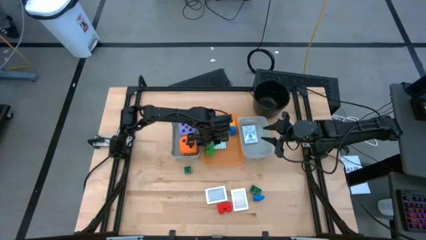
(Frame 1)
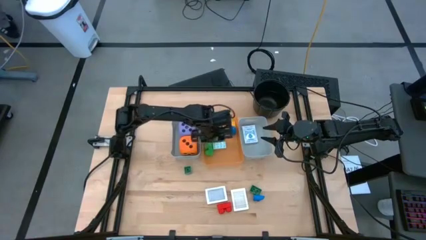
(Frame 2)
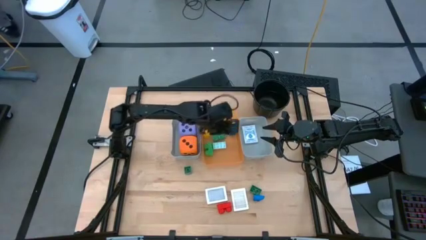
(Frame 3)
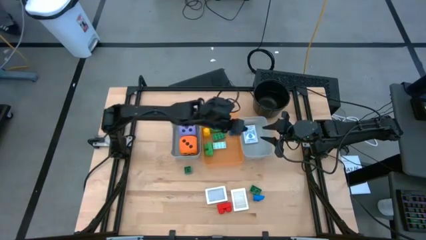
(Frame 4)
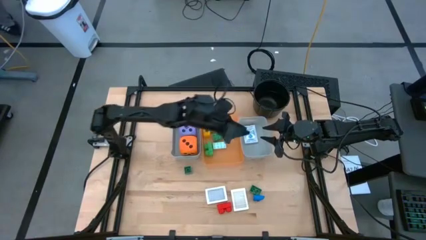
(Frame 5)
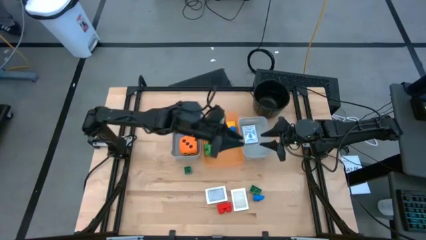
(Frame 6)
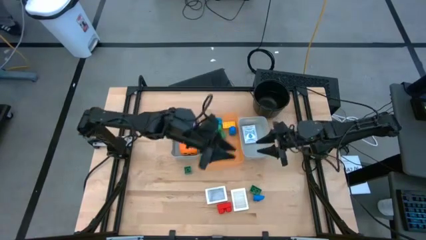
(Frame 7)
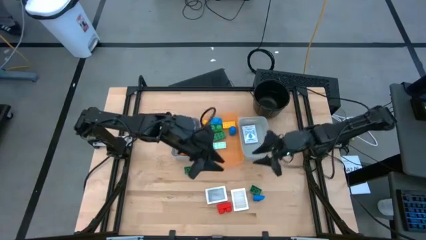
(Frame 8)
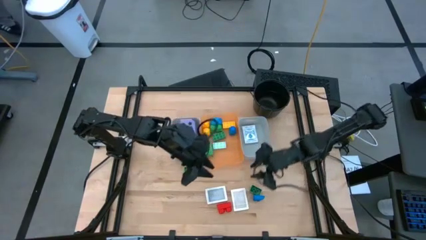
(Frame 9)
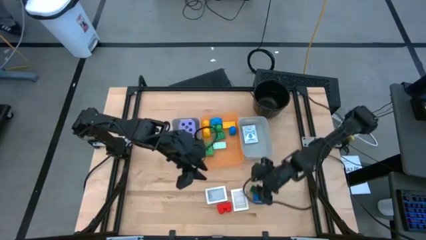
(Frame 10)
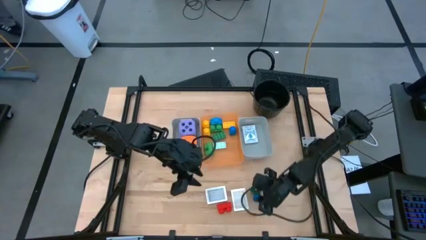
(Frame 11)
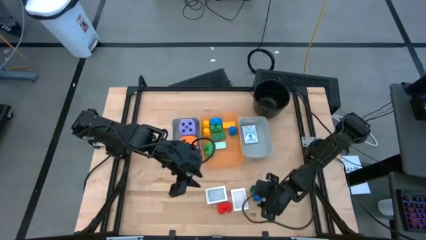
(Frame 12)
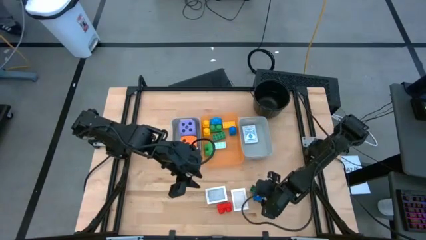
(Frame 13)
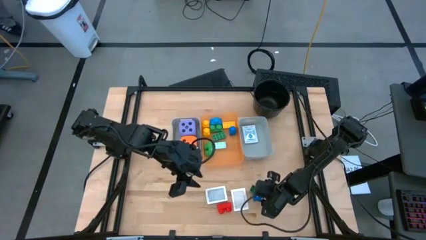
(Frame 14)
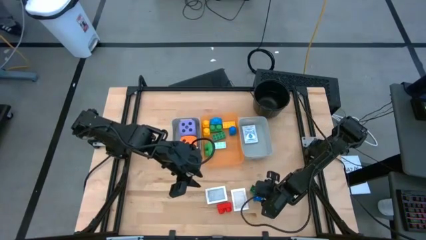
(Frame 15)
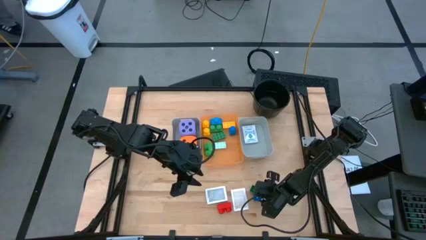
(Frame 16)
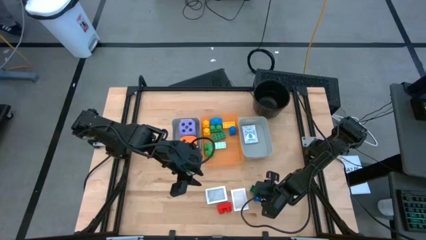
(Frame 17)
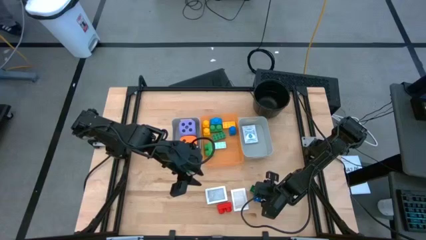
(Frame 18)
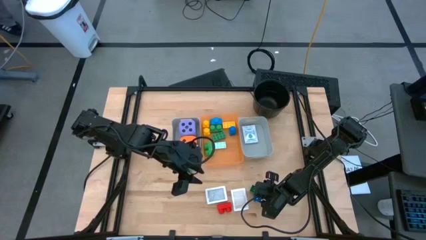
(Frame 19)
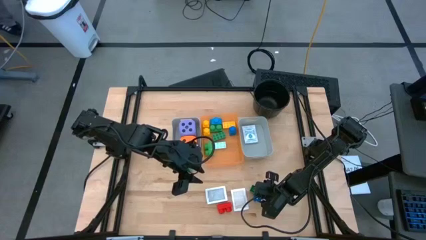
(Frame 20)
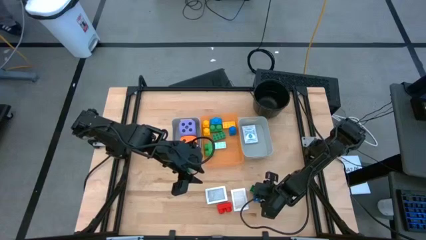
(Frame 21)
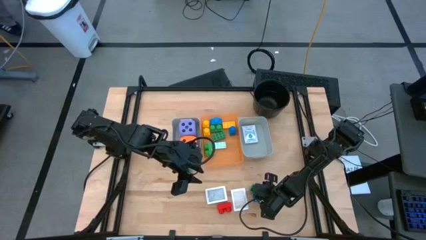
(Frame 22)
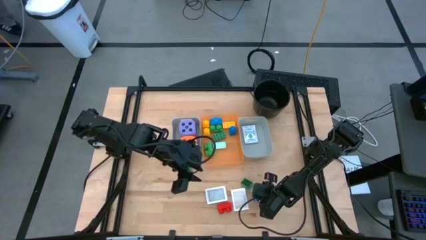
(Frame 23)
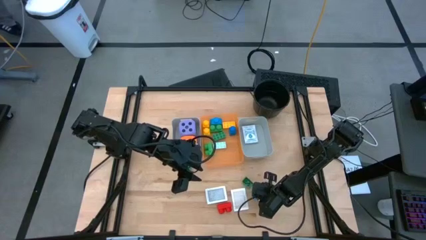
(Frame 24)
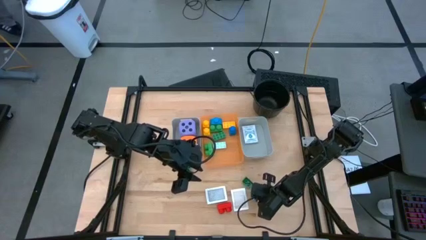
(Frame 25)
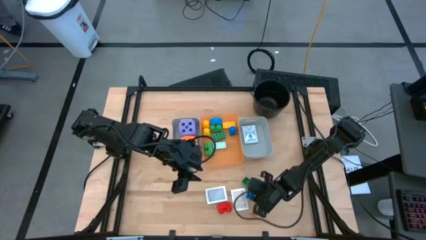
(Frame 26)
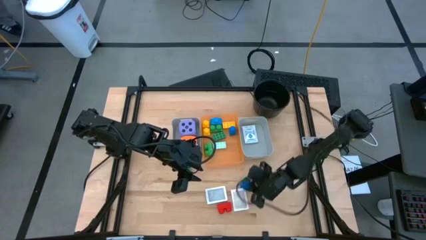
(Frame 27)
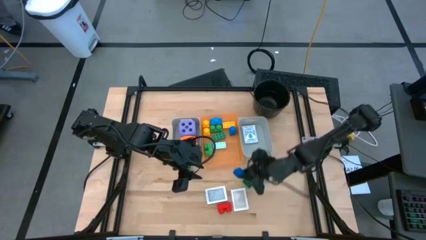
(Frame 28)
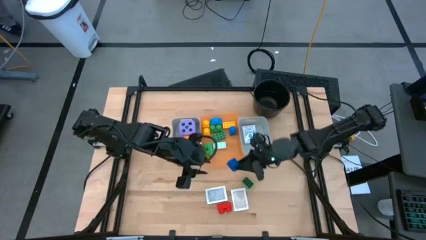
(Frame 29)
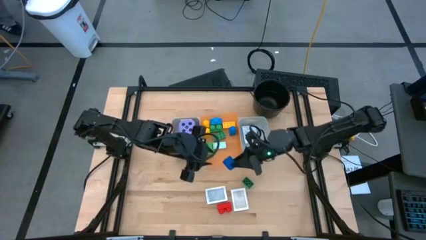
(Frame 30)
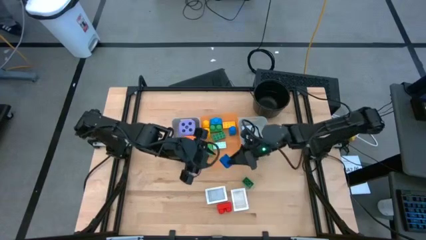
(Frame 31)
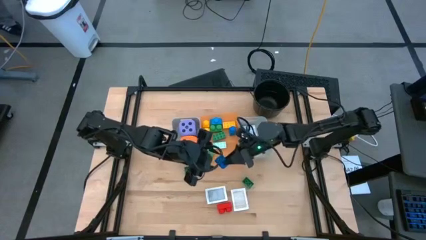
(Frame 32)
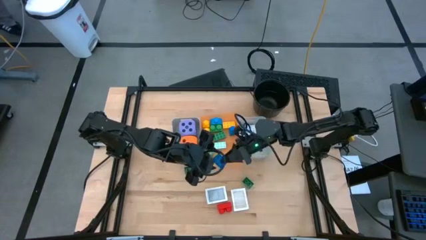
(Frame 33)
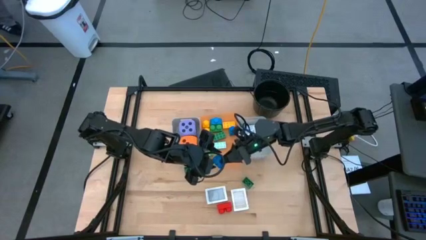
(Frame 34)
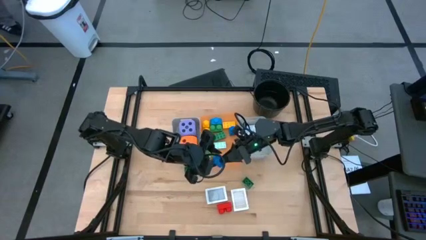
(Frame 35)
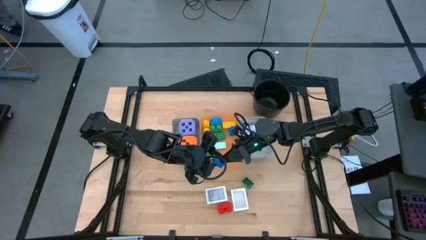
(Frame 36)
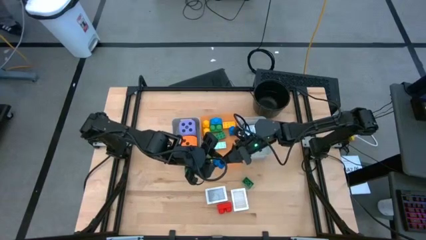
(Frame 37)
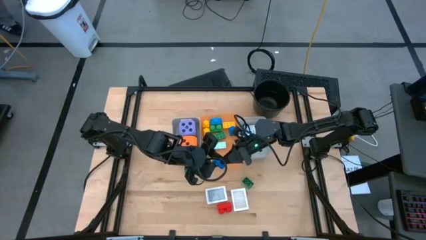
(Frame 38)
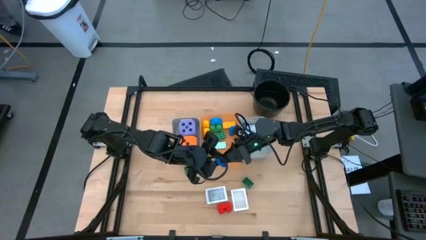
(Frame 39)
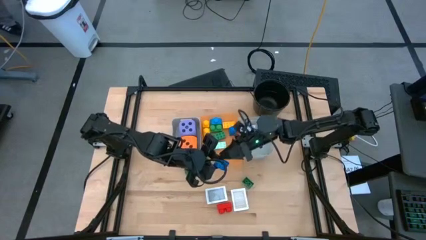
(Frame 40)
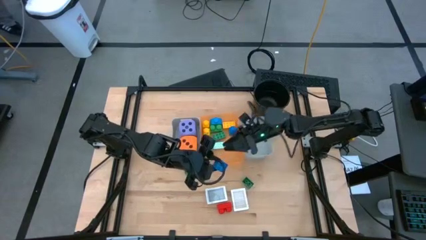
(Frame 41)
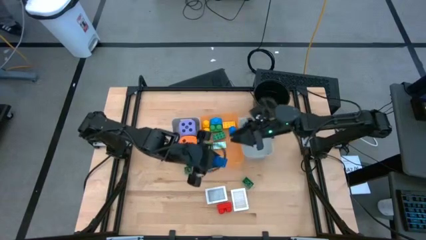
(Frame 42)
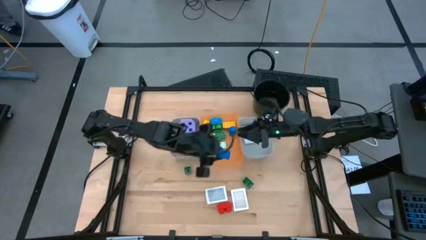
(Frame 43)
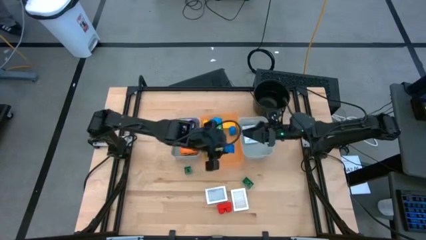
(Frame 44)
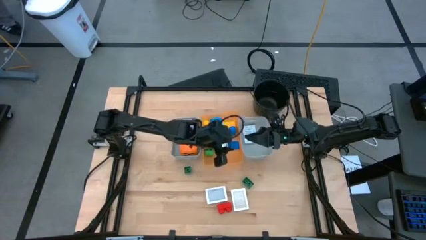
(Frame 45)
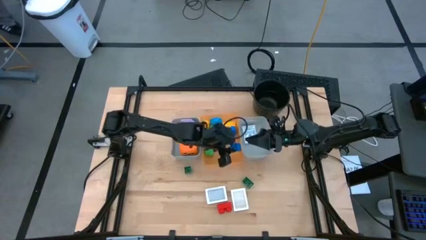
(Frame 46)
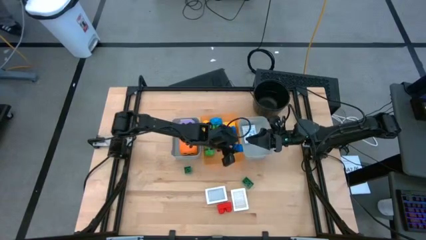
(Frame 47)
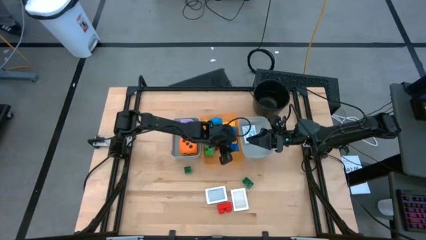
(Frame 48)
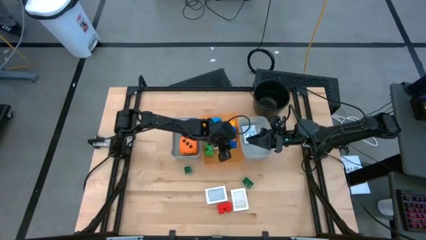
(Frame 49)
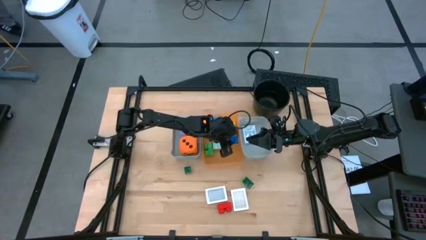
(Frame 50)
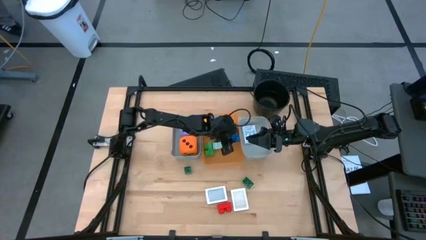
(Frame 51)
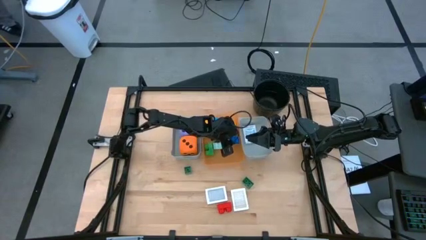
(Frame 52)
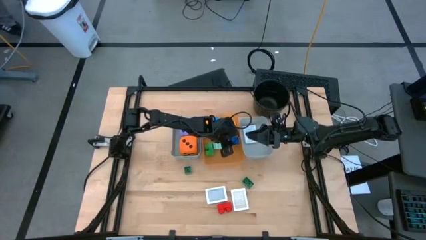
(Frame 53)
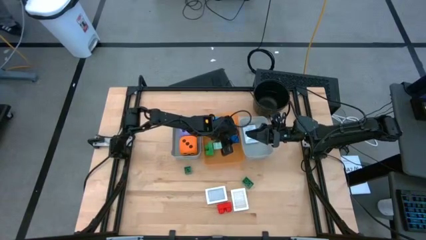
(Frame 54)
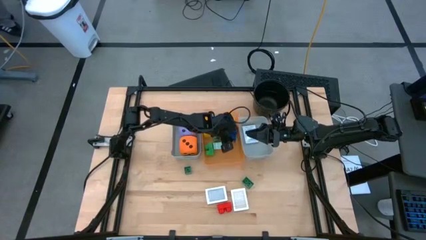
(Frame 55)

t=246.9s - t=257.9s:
Task: Pick & Place Toys
Put the blue game piece into the orange bin

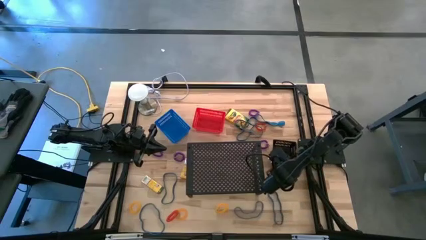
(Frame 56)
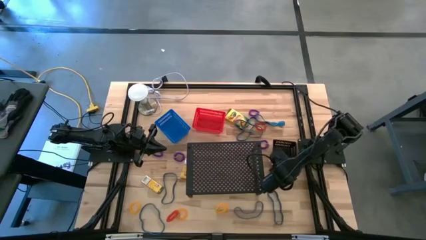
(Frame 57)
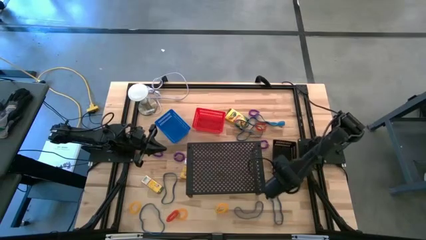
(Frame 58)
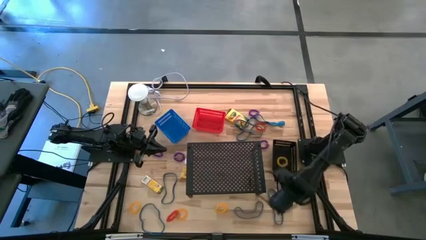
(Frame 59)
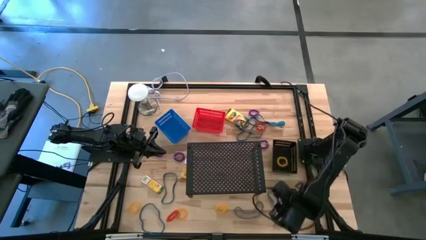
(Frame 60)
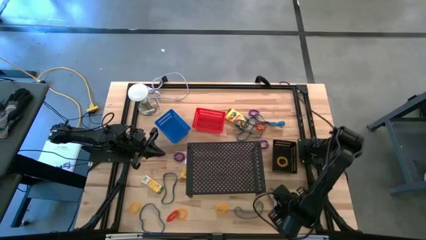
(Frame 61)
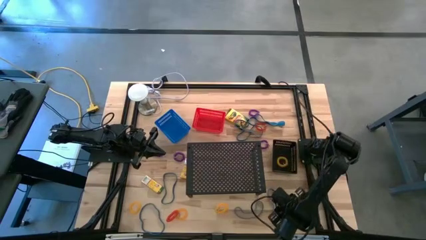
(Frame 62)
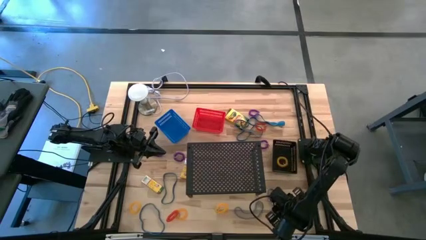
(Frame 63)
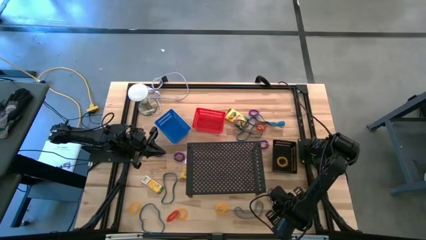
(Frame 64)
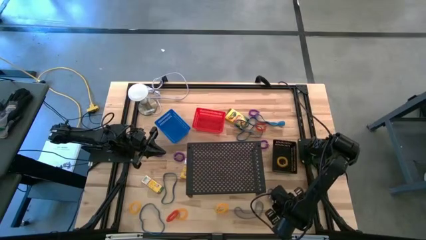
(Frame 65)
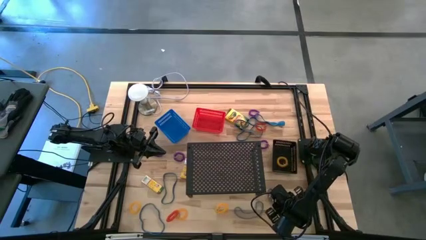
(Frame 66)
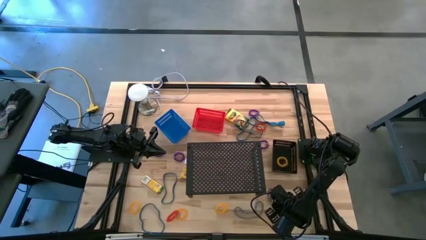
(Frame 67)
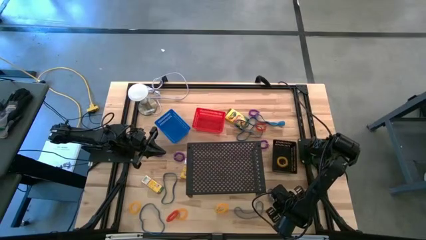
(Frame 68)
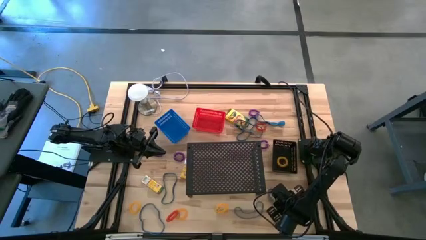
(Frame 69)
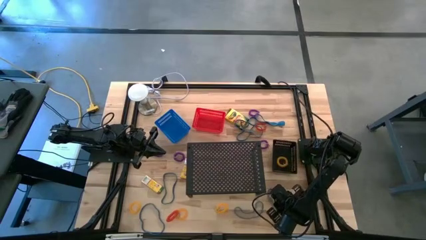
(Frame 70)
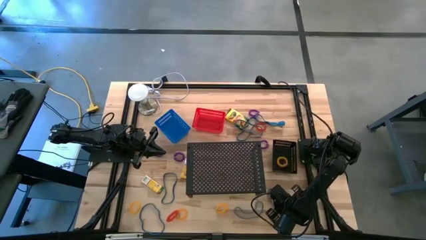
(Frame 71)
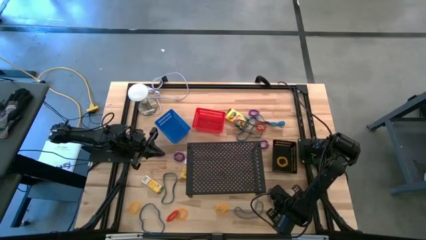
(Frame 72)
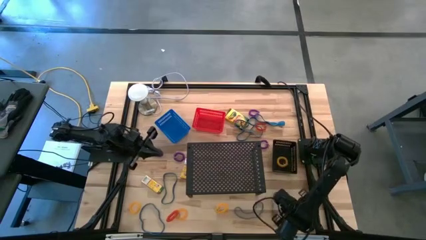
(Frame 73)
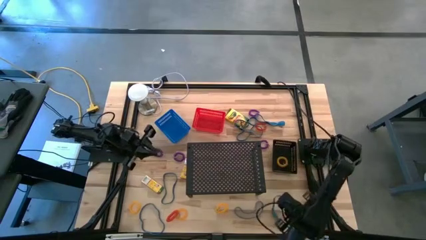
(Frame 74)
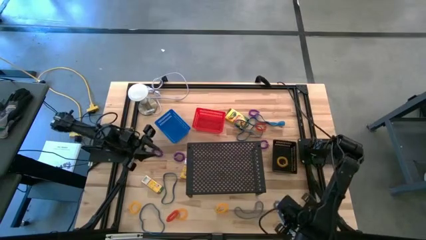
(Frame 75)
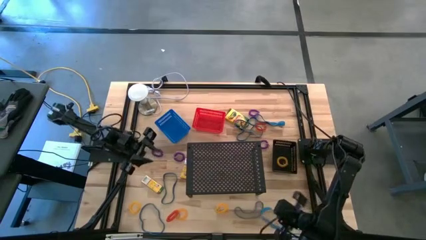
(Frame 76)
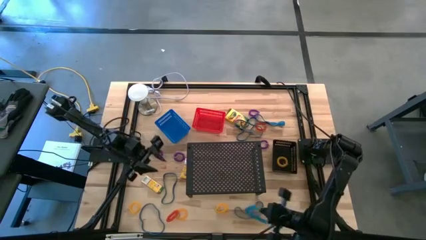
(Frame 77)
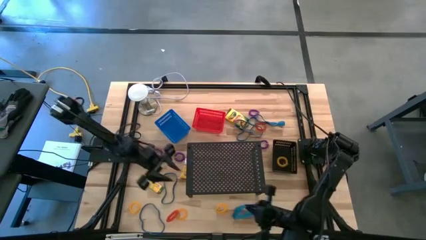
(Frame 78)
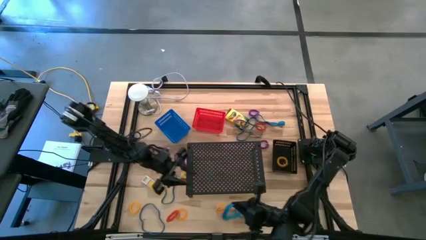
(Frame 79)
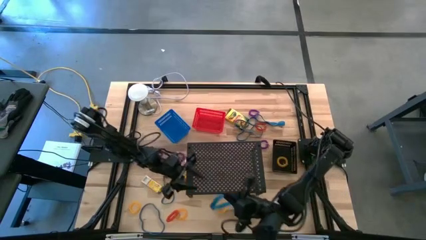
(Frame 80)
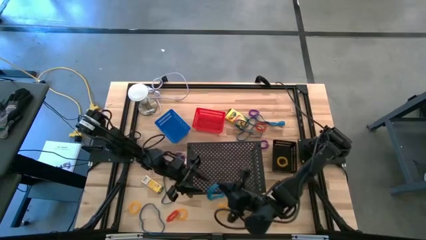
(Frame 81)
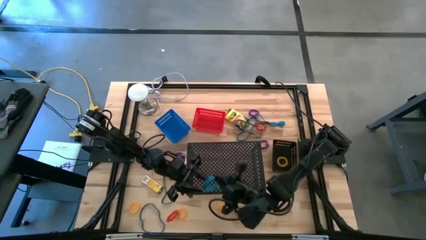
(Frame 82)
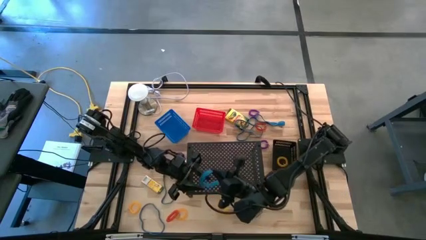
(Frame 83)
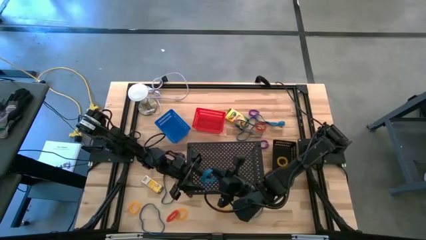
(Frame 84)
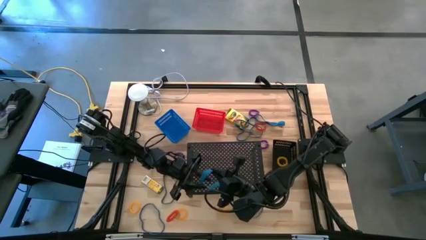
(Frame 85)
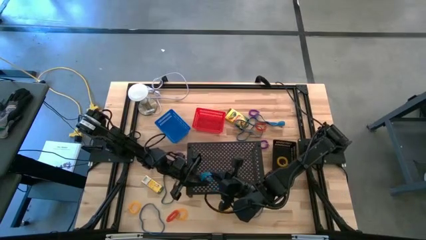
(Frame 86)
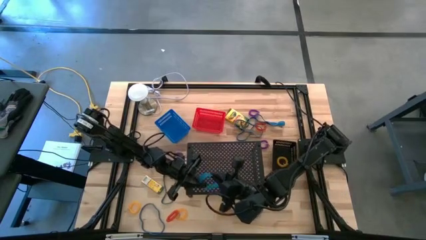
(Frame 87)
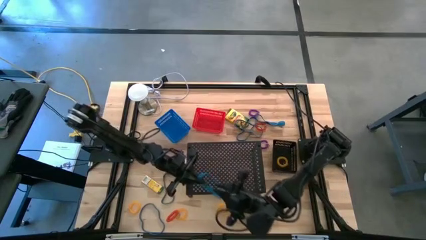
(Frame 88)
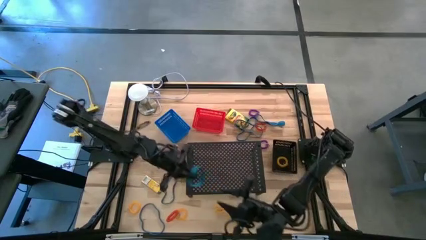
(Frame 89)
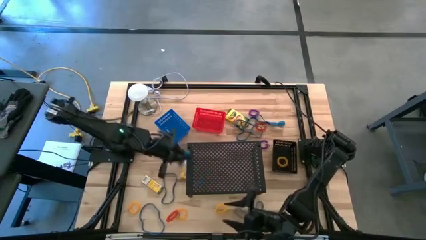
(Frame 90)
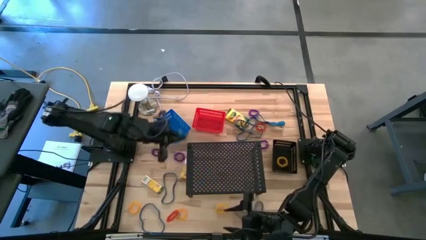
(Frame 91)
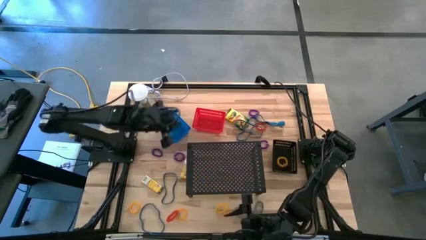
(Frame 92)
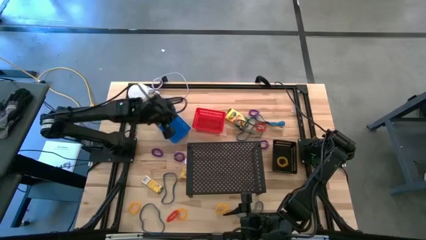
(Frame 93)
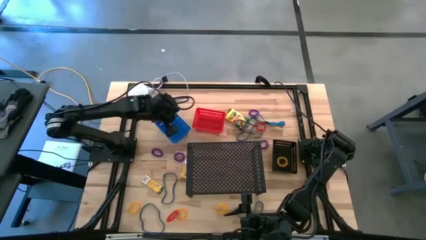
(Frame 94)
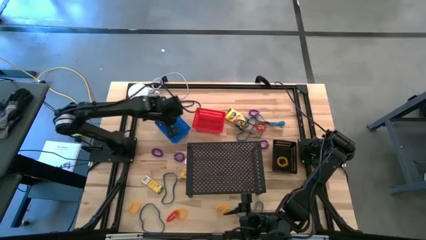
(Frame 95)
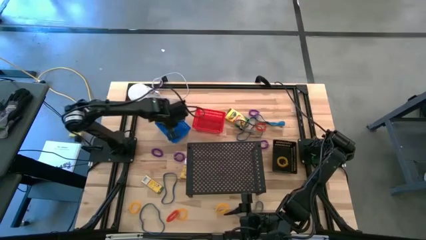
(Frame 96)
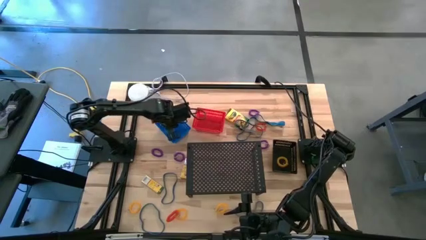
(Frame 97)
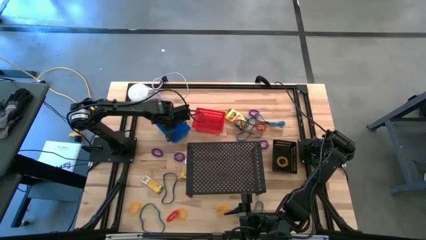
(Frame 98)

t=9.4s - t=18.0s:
Task: Pick & Place Office Desk Supplies
Put the blue rubber band into the blue bin
